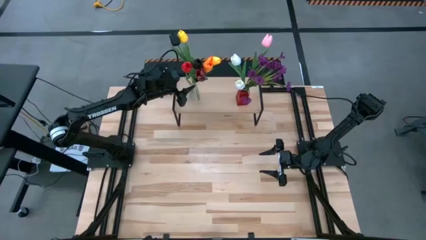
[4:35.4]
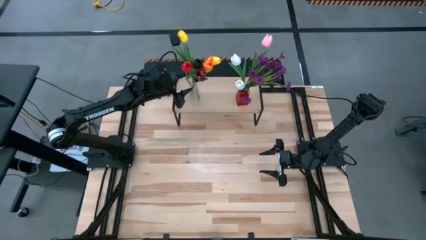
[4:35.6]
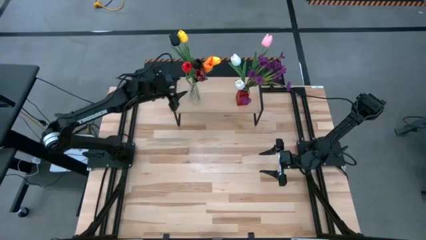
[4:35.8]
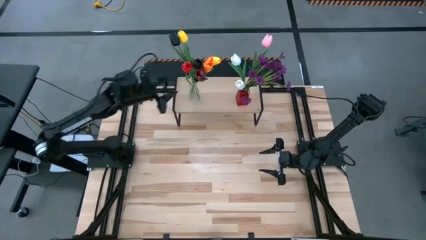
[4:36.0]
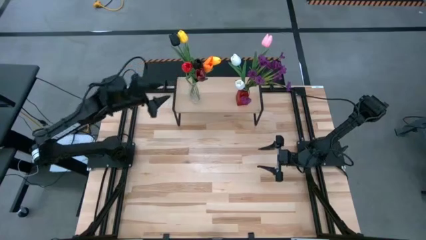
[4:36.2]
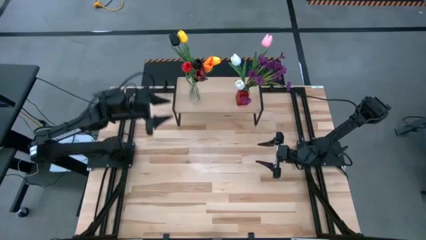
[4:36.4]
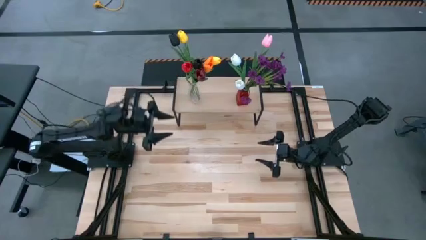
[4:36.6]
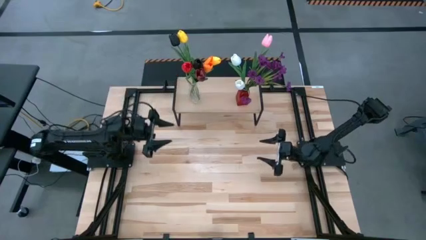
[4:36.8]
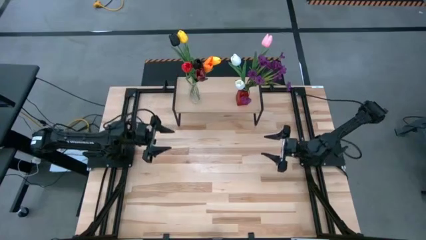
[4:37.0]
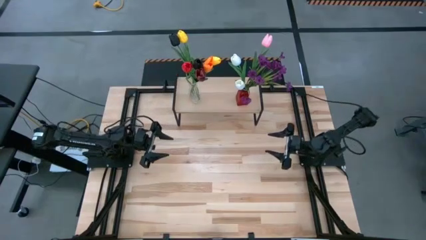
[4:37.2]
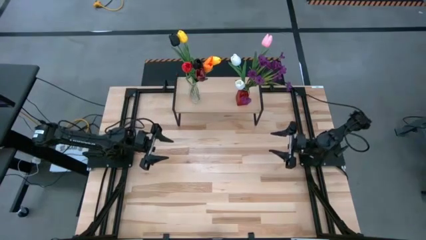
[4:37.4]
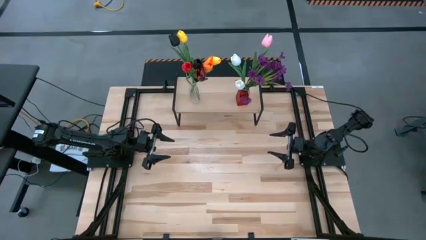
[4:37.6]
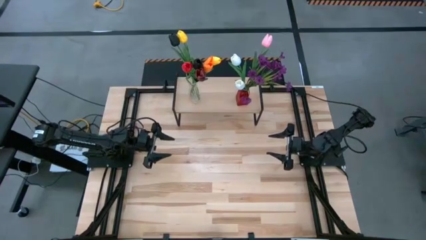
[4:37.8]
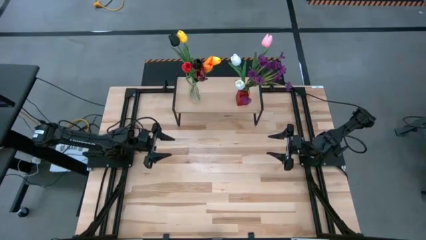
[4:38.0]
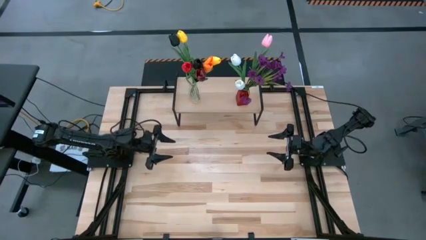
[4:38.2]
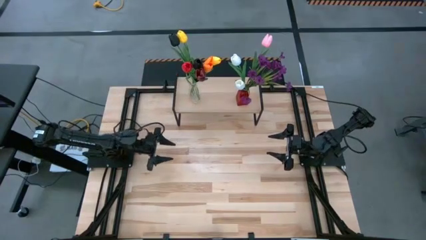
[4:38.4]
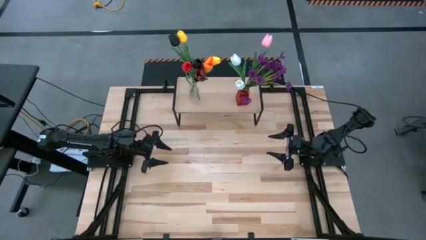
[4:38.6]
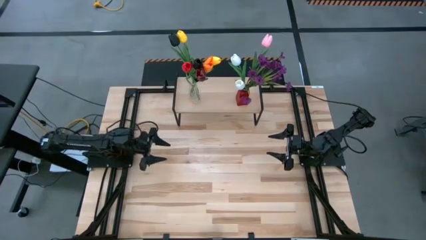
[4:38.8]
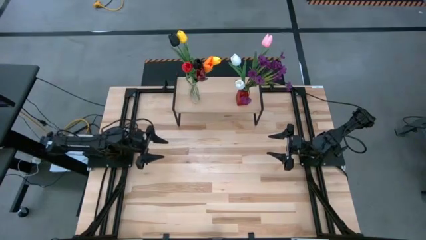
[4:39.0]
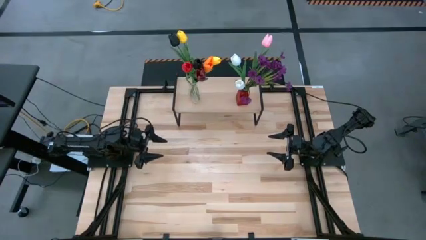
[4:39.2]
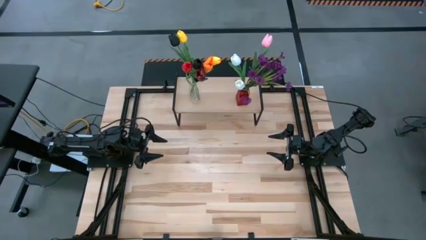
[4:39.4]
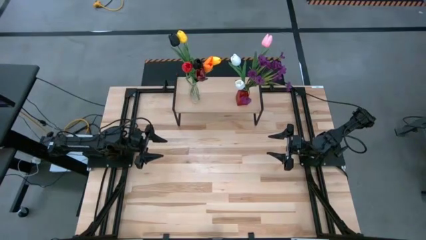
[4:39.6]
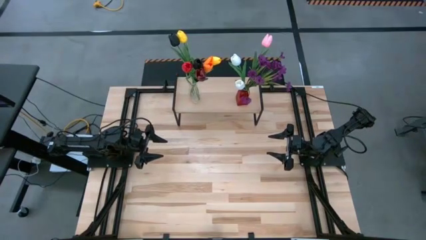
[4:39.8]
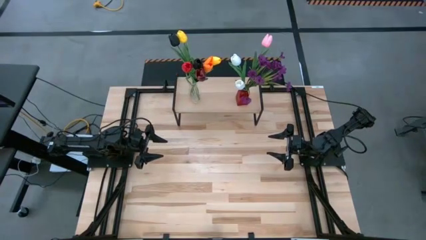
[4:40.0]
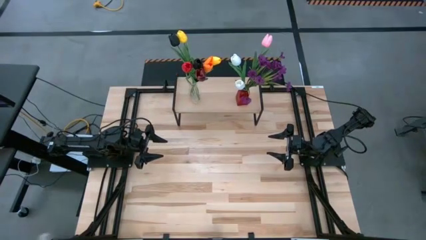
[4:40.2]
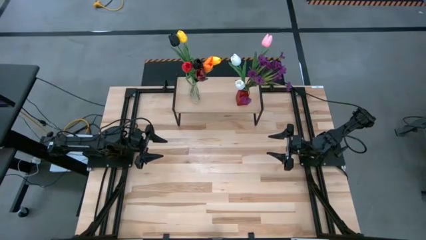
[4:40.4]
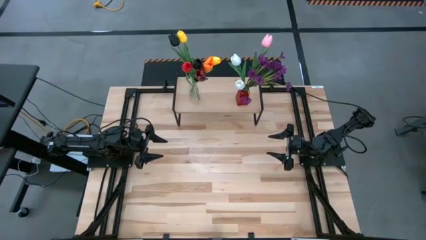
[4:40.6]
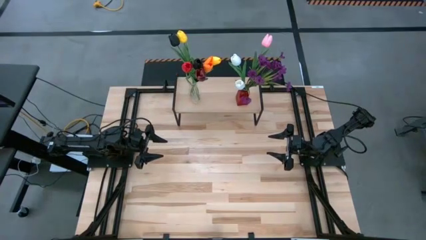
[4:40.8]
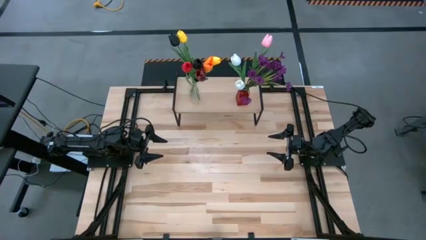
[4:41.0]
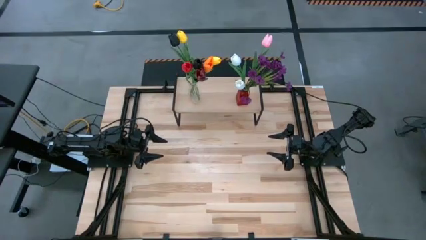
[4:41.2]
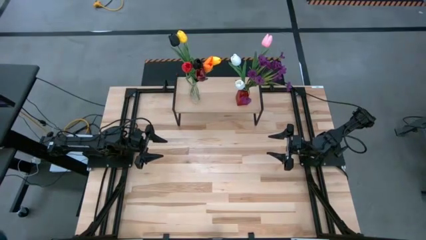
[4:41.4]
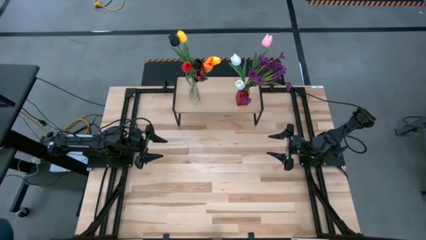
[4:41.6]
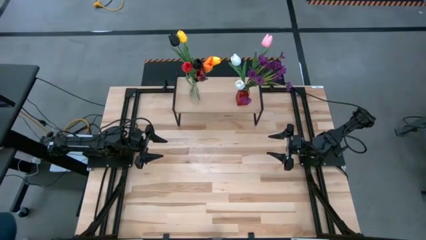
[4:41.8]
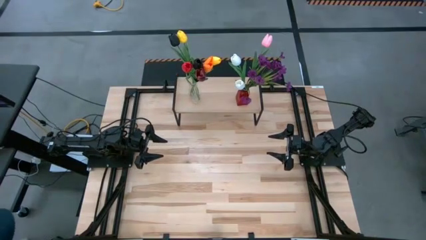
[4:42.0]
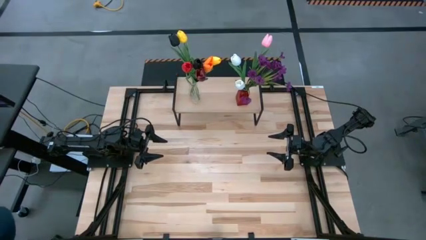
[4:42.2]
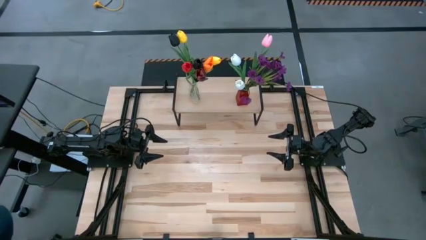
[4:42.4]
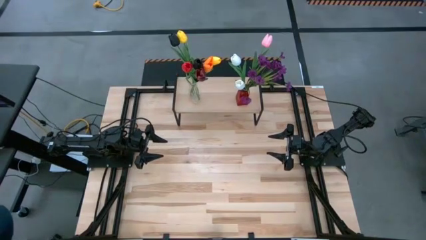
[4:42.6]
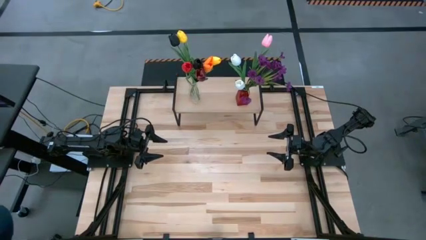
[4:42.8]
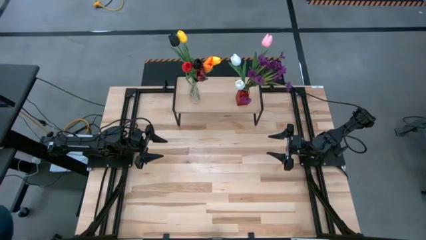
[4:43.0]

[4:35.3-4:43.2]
Task: Pick and place flowers into a vace then onto a shelf
Return to Home Position

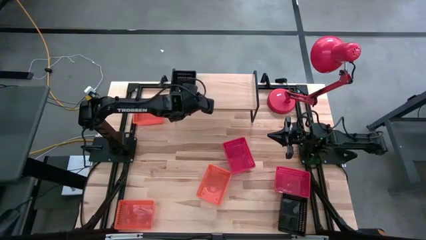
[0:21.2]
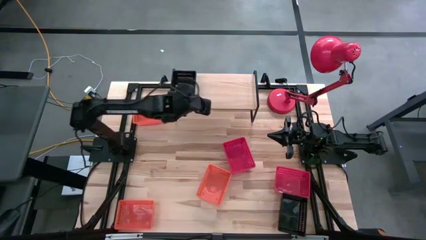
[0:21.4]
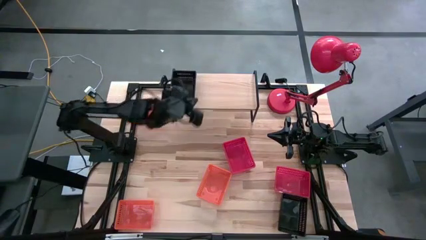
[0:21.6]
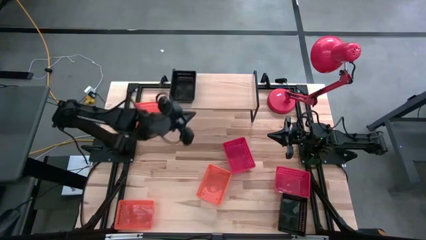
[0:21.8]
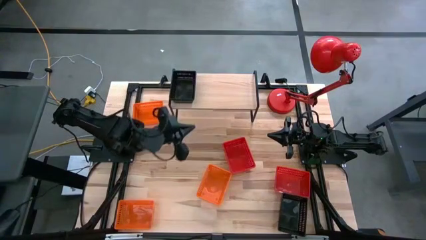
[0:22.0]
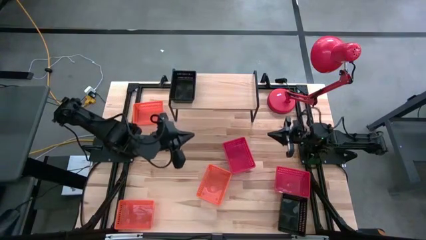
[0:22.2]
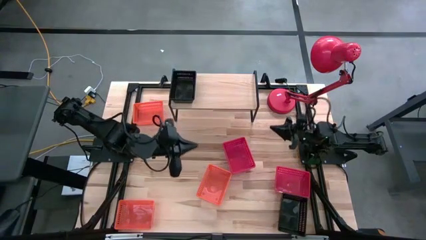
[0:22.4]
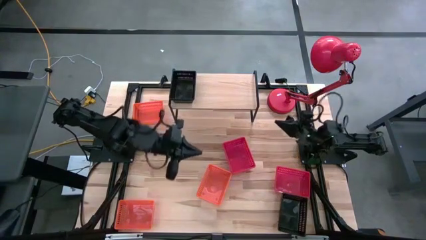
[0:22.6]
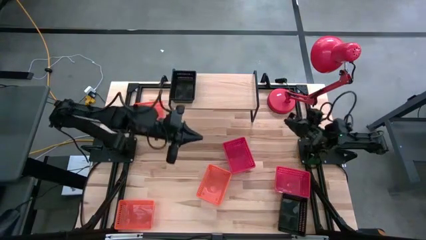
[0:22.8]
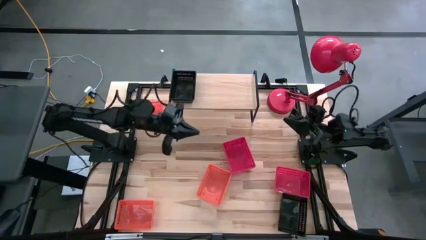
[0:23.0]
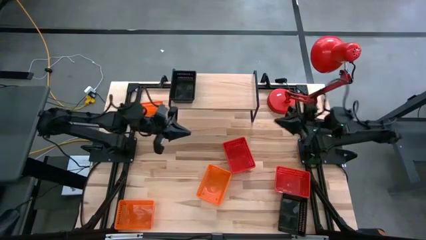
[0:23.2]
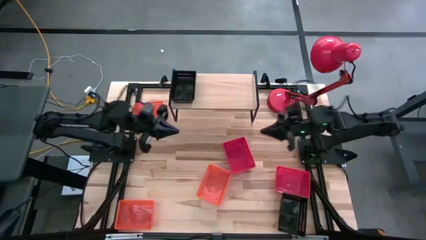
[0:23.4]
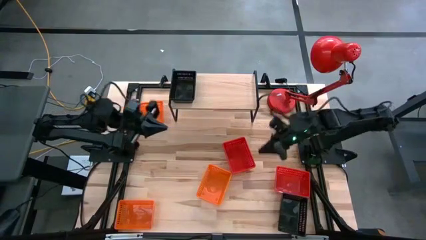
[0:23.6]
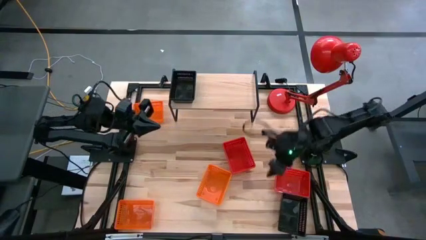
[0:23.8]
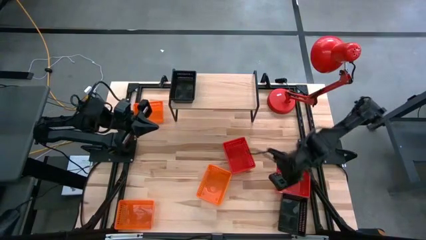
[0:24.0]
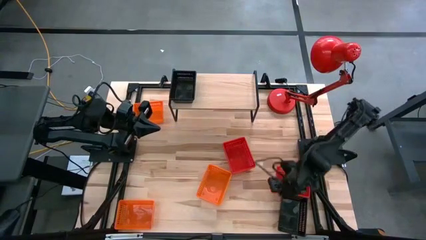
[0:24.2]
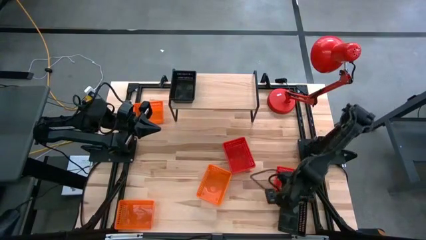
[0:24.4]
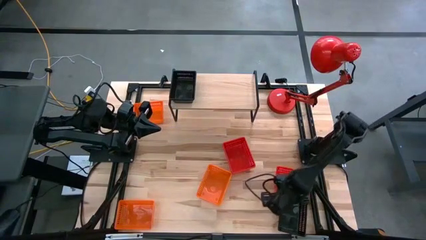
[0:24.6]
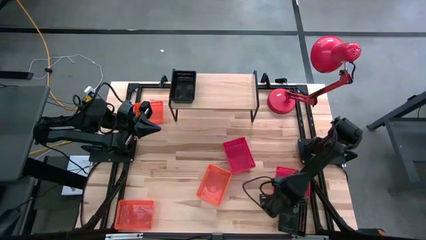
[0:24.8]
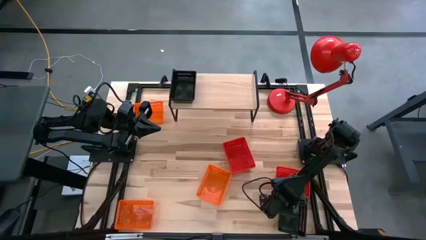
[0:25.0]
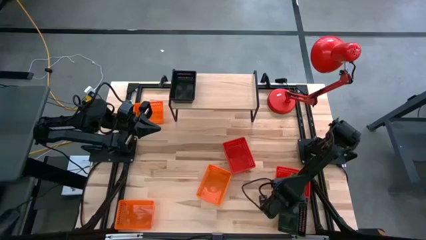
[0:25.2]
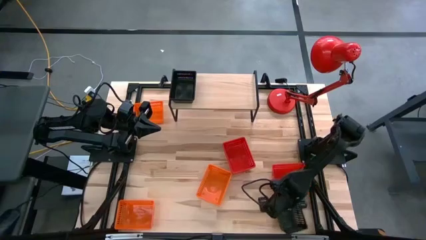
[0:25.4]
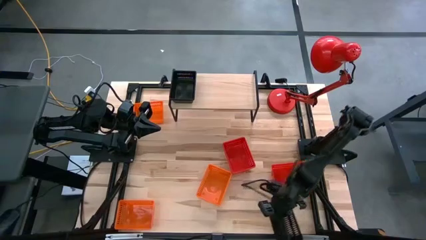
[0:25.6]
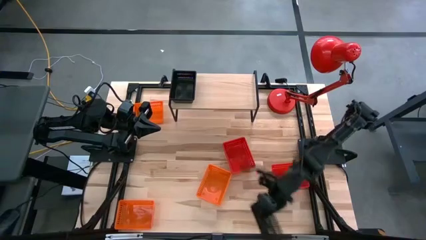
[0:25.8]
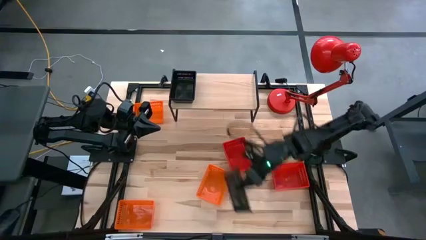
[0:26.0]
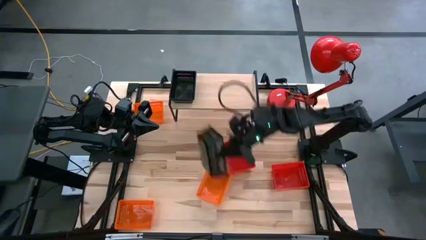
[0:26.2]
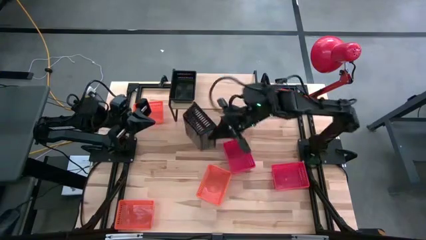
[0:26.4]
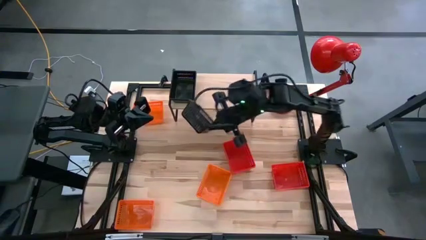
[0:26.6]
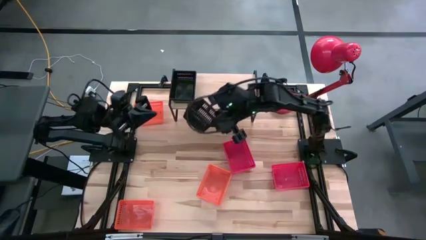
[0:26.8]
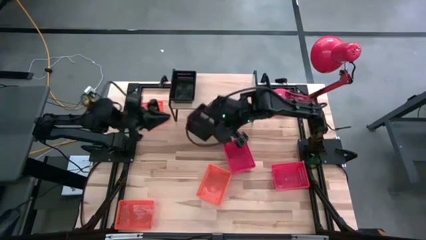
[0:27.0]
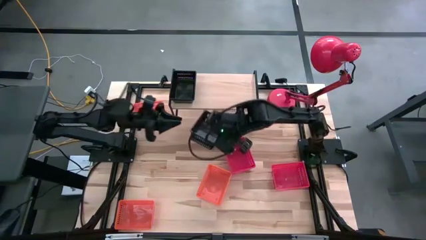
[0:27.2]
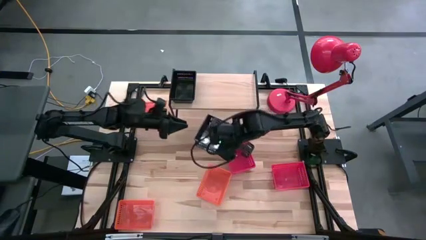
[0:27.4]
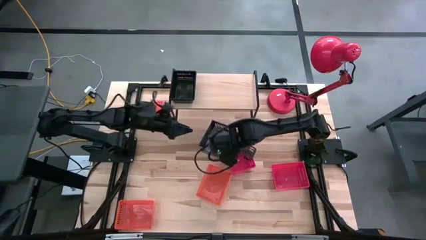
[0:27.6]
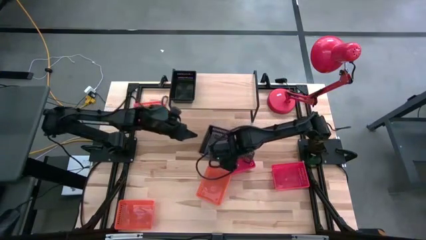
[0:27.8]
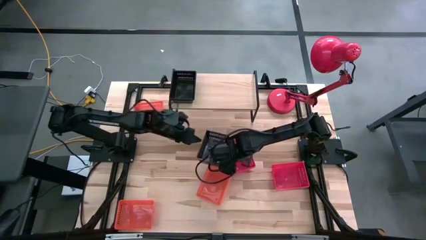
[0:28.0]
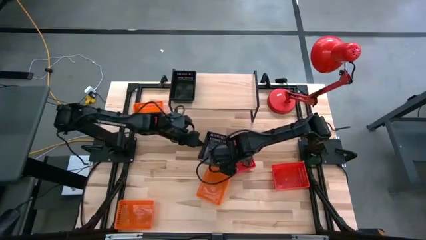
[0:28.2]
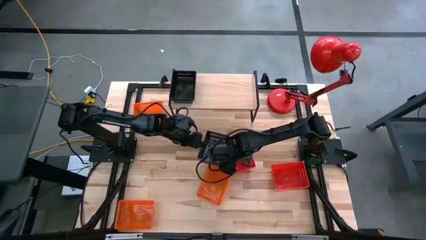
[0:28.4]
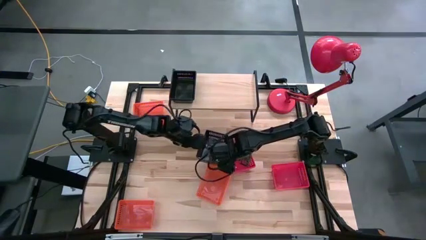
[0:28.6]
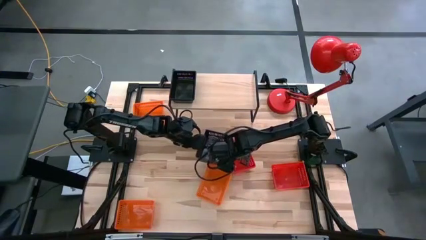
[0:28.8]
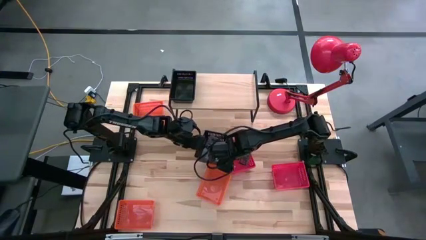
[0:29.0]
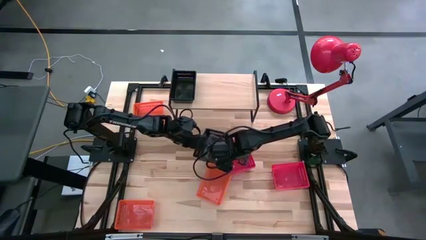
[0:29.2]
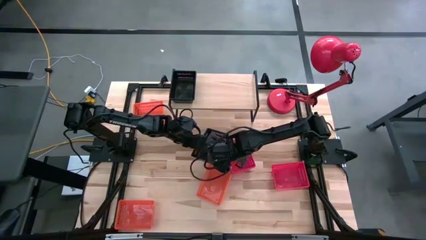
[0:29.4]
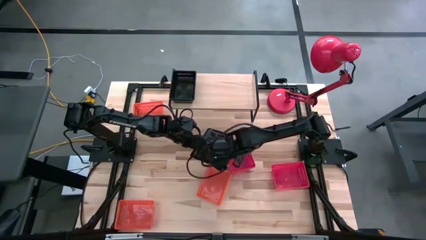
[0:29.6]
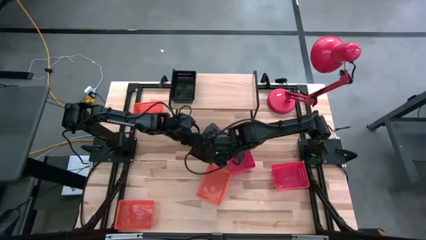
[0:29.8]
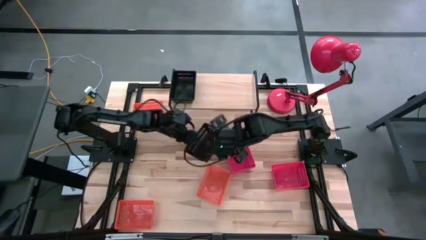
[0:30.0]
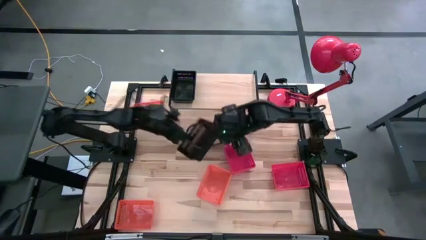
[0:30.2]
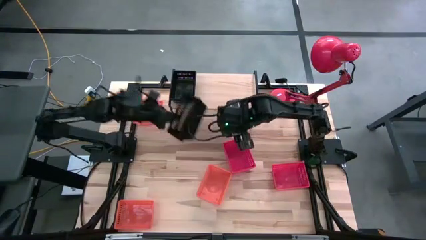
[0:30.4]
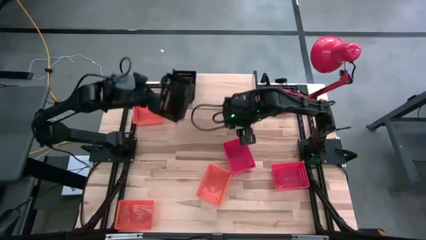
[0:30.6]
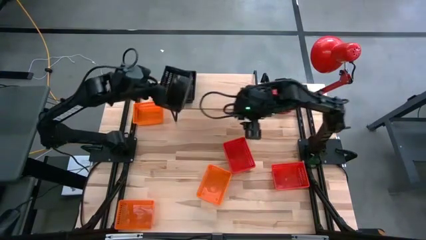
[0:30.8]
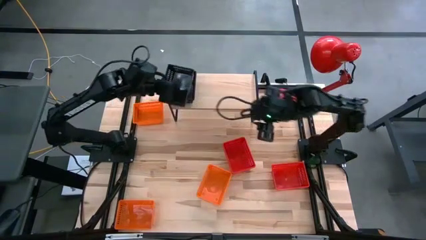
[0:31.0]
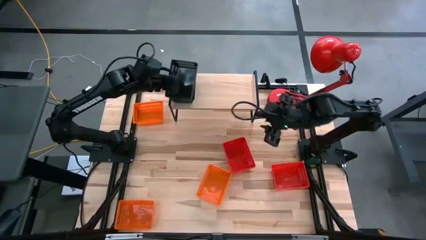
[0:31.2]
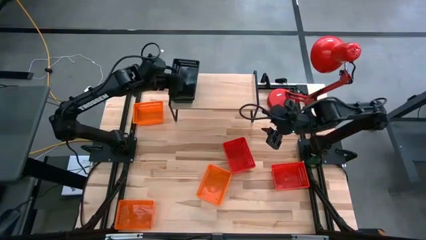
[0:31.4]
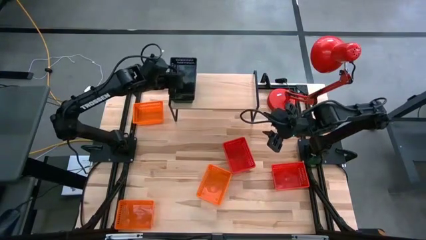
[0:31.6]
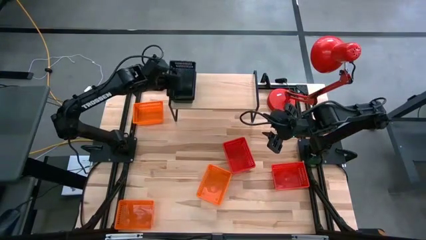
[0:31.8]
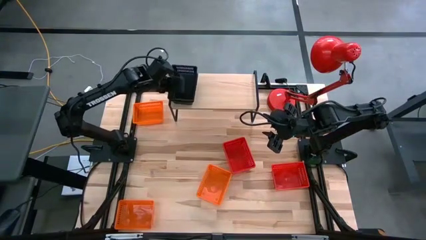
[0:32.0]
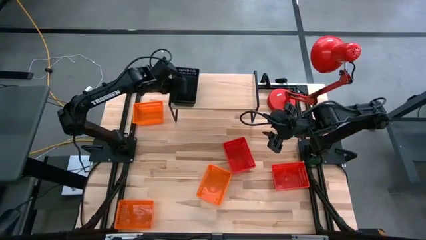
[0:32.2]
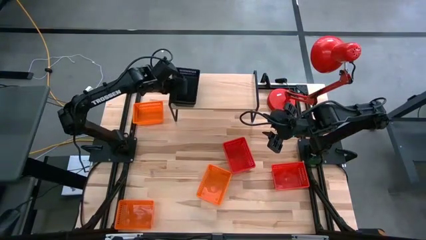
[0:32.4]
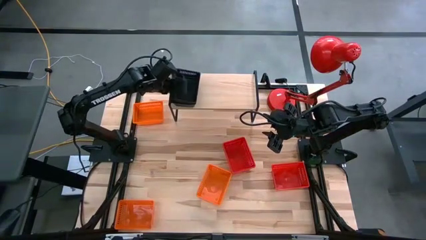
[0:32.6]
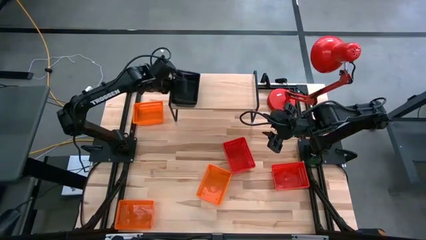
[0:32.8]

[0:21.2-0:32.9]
Task: Stack baskets on shelf by color
Stack the black basket on top of the stacked black baskets on the shelf
